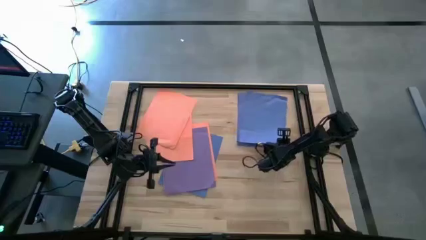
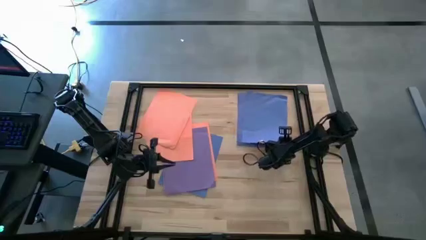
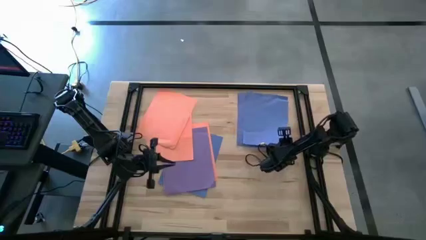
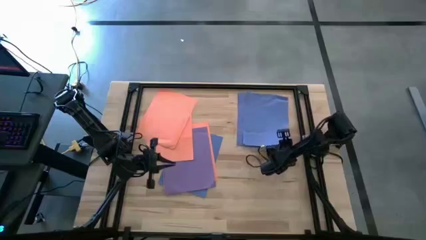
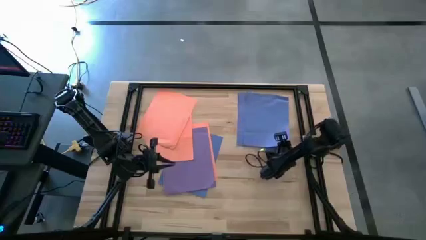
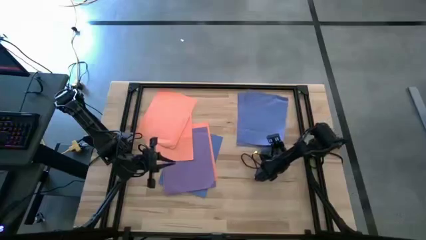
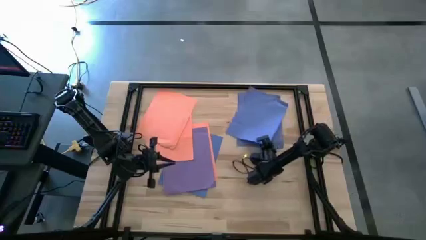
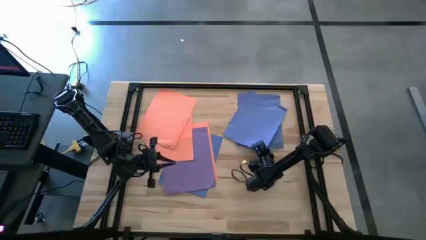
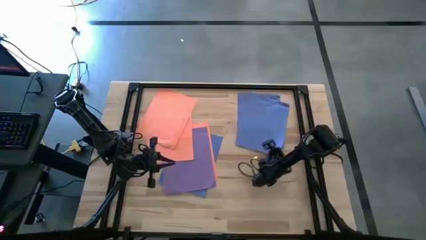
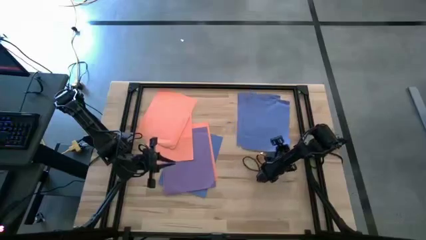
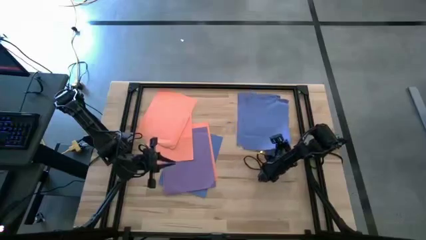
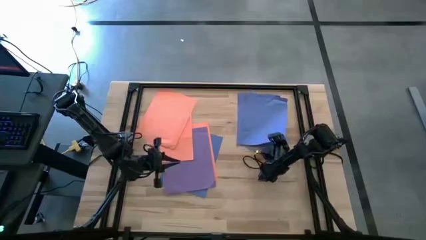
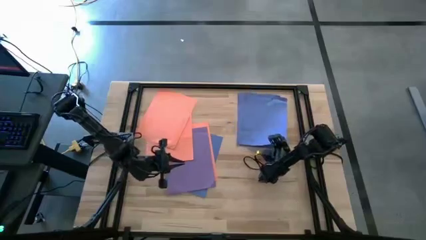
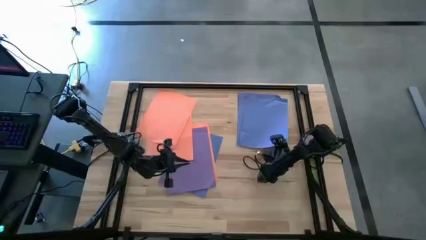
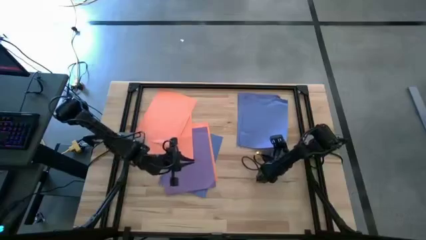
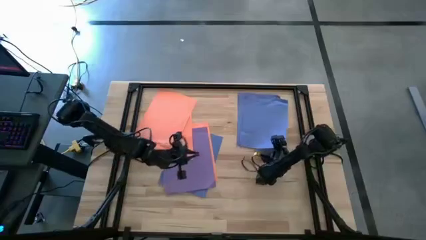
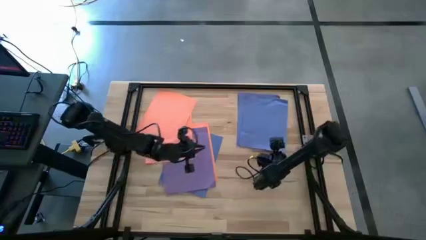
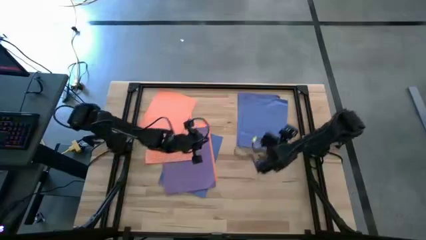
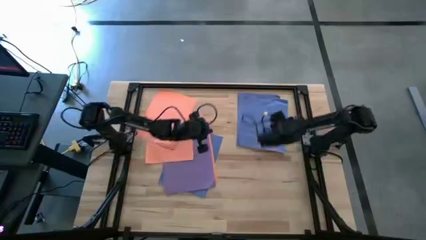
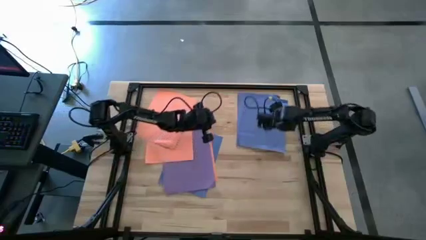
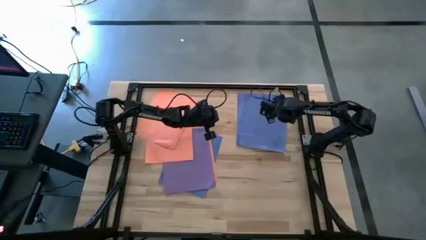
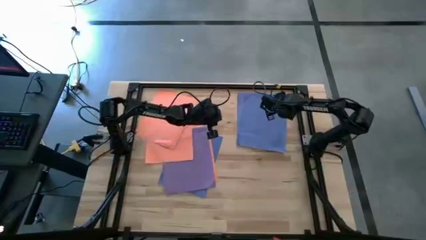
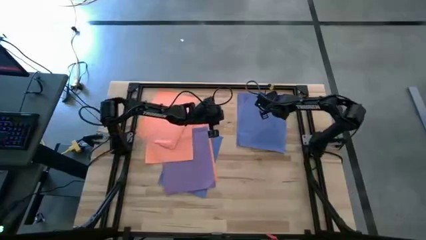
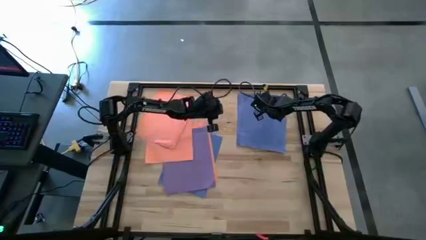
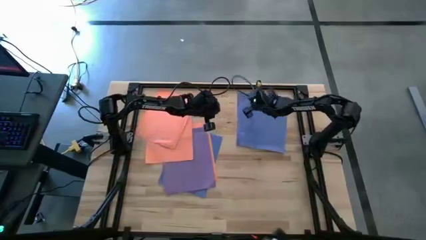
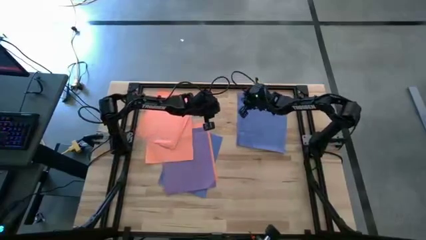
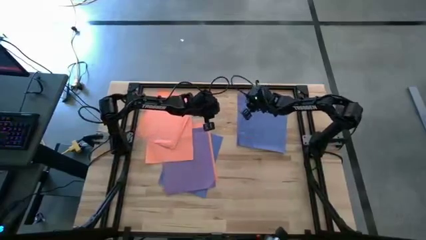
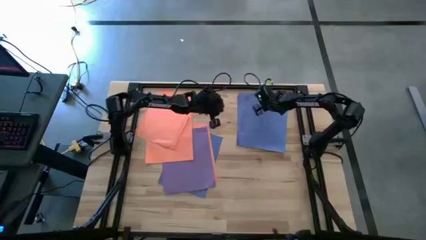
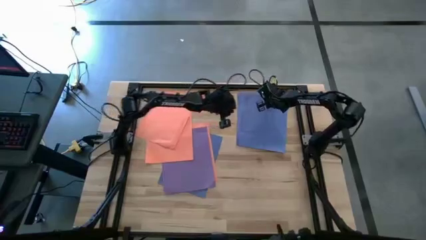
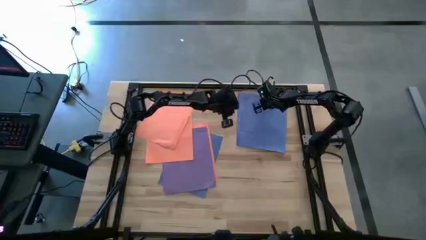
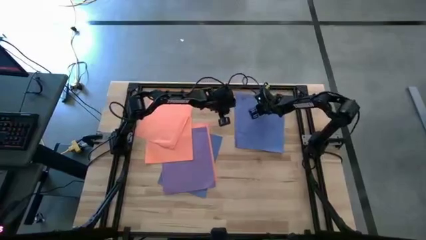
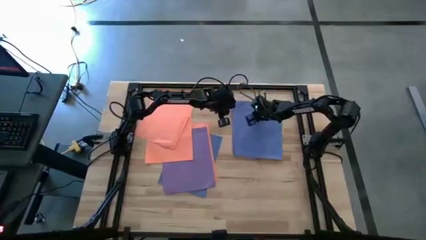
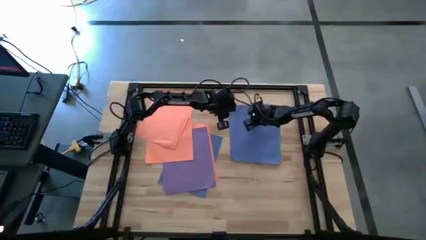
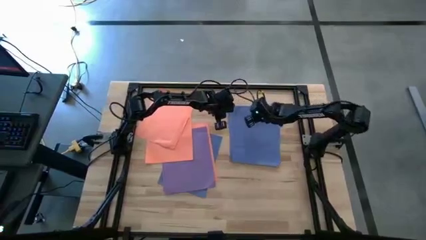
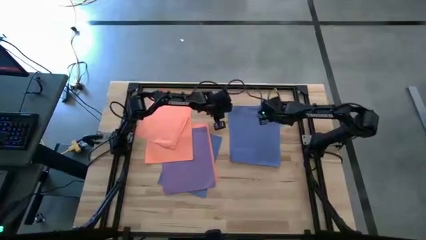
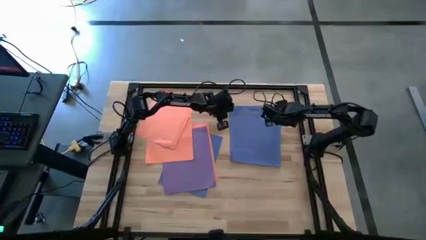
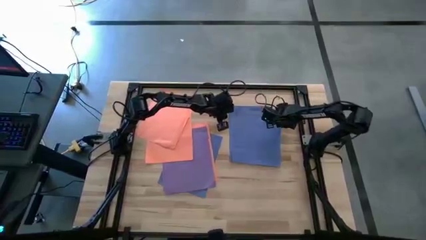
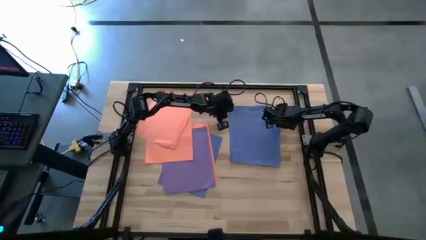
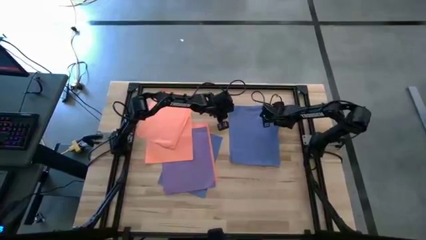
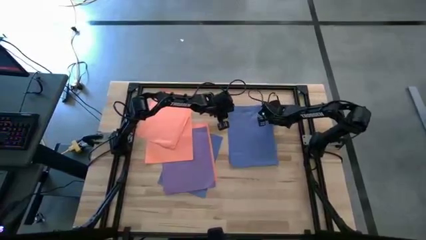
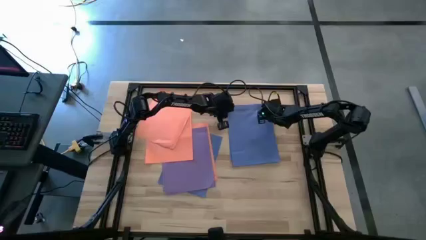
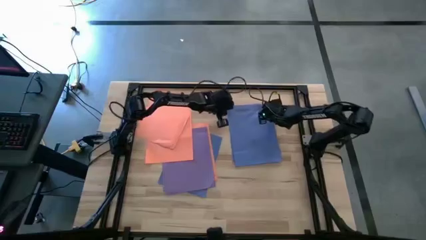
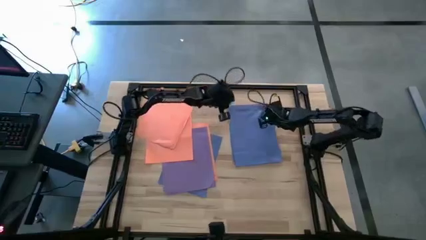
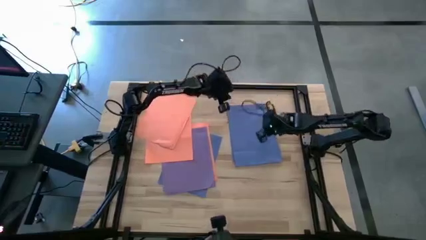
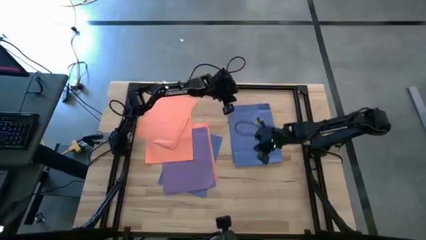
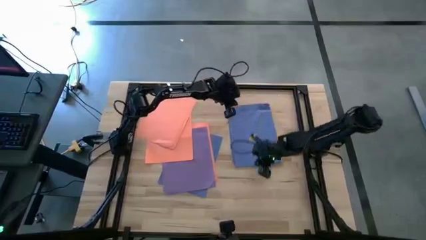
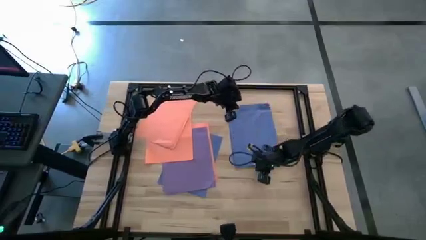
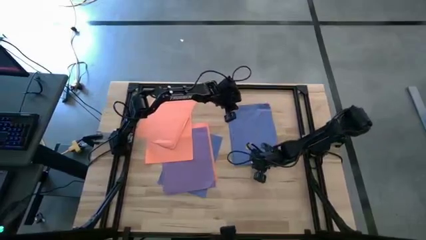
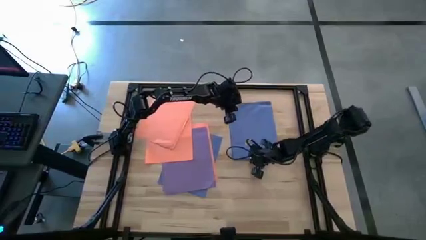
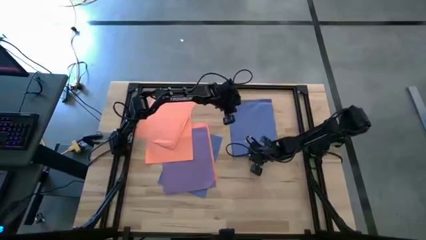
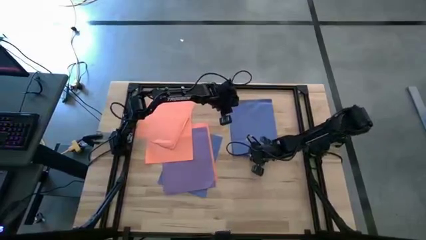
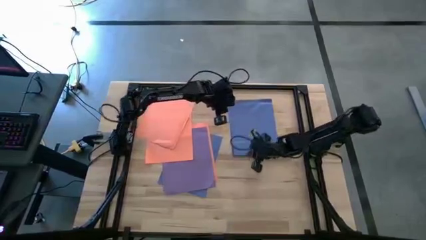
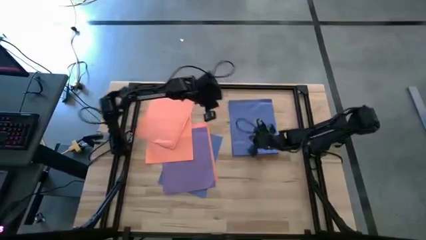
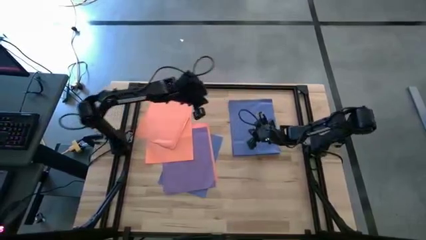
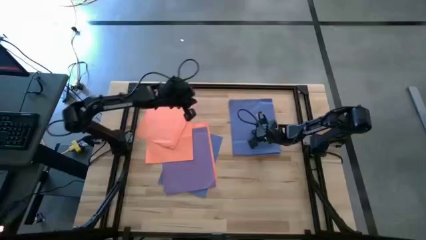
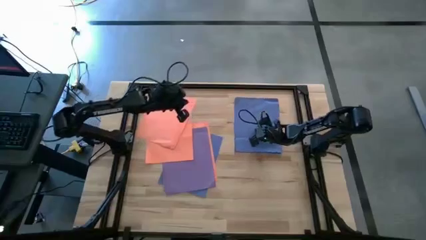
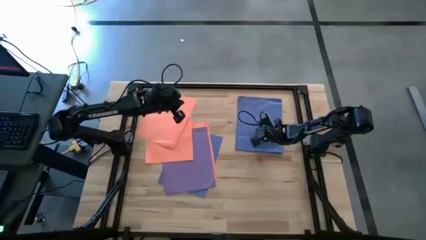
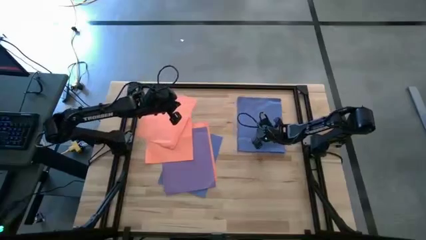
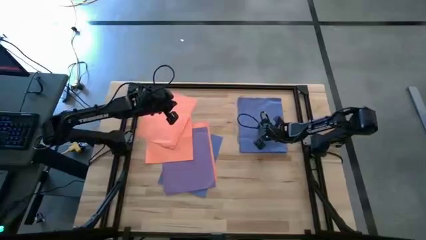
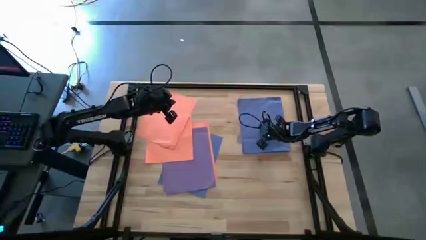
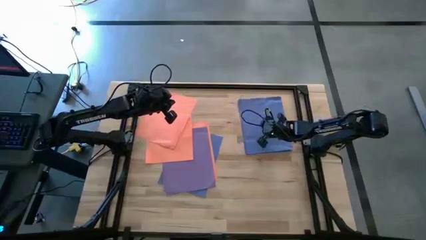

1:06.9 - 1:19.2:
Task: Organize paper
Stack the blue paper on top of the blue paper

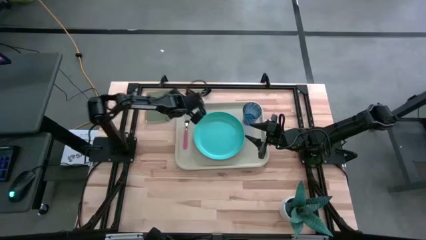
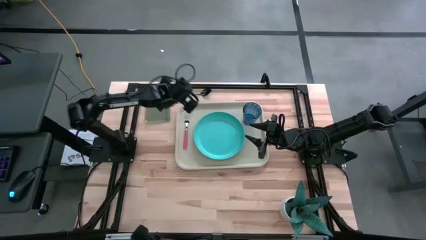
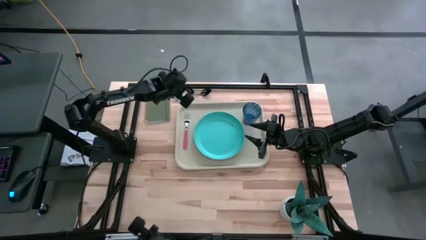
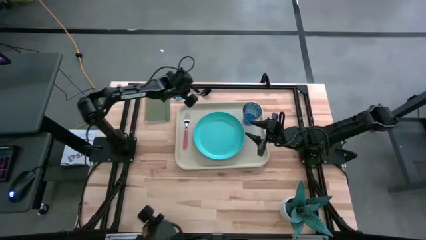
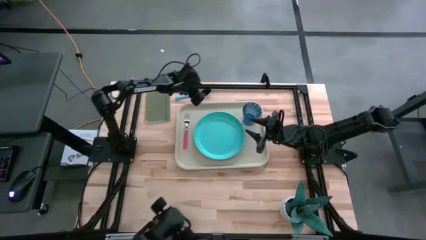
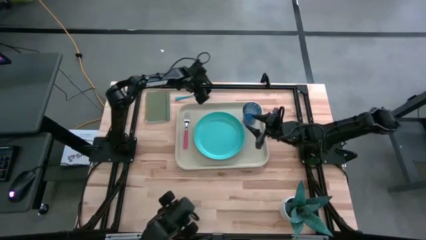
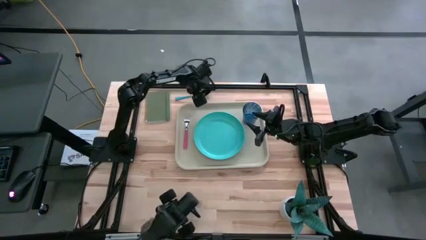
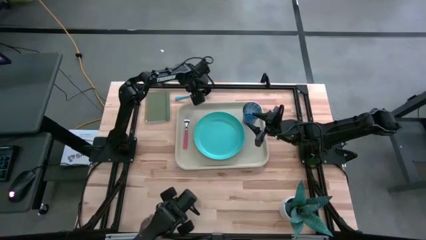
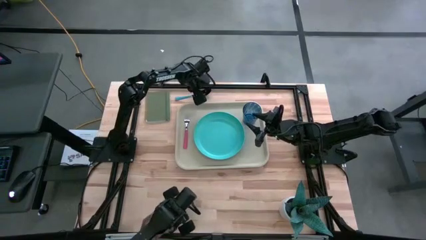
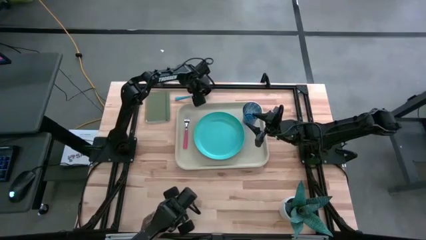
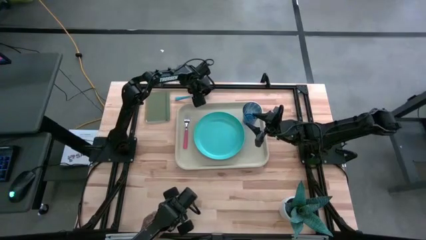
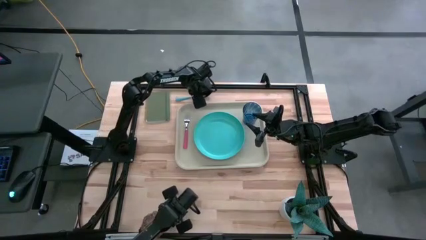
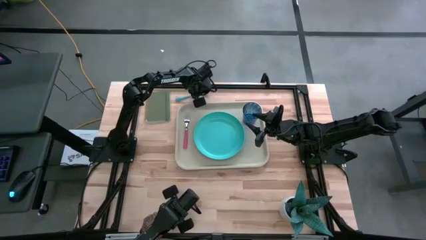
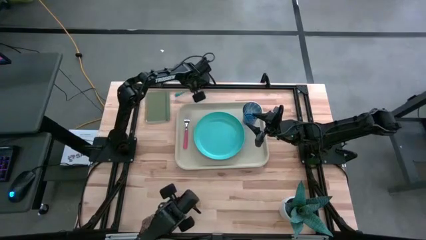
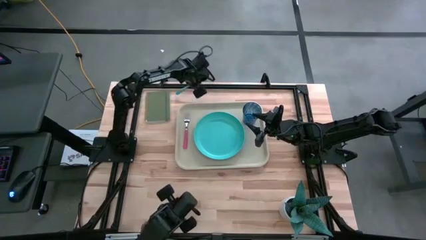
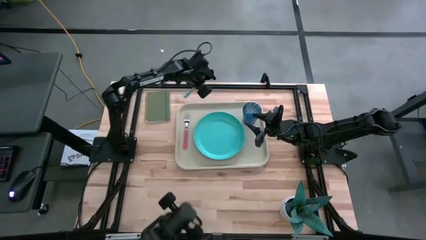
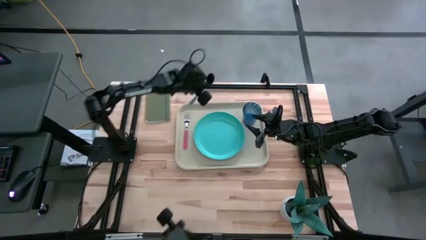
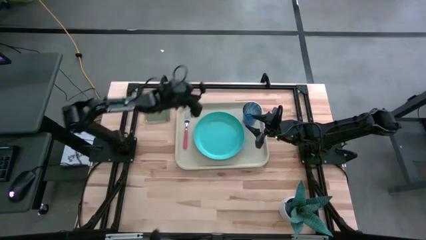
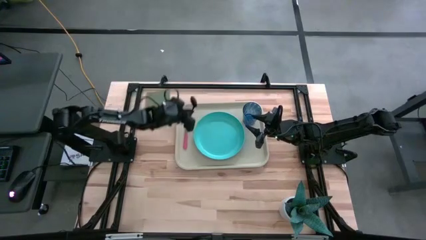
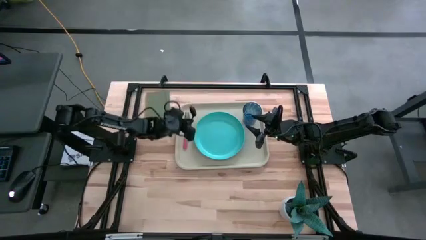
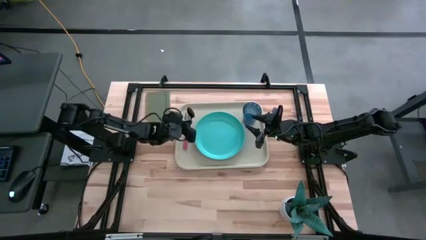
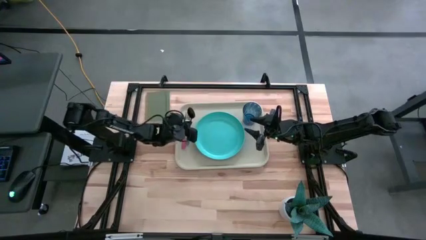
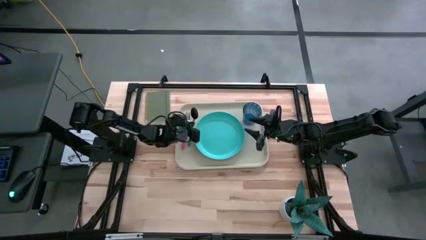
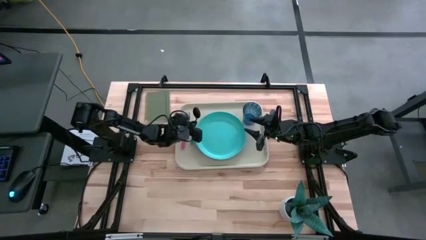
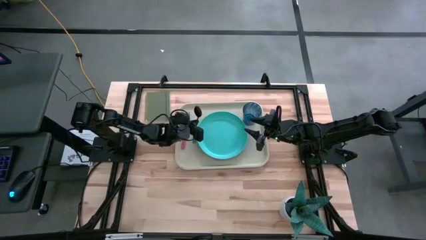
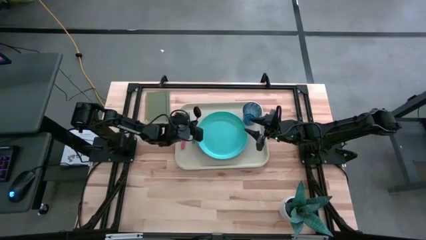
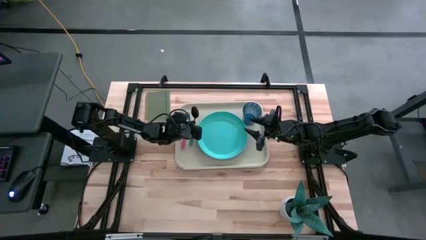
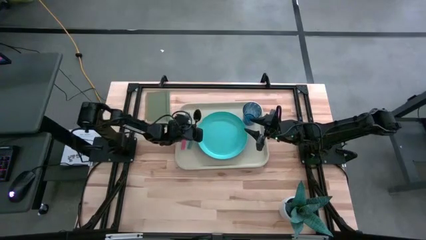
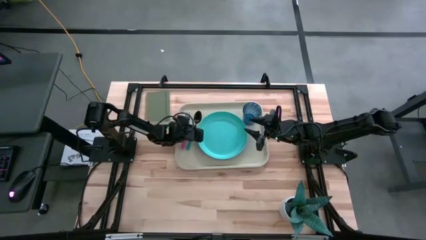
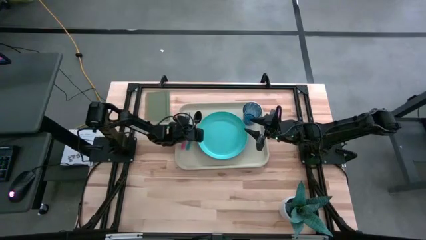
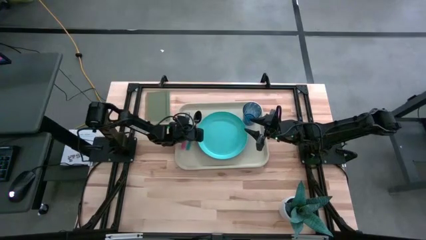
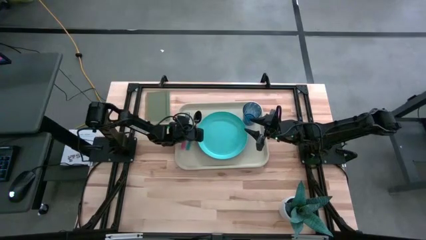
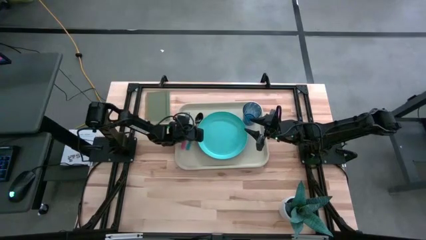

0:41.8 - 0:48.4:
Task: Pick and place plate/cup/fork/spoon on tray
Put the blue spoon to the right side of the pink fork on the gray serving tray
